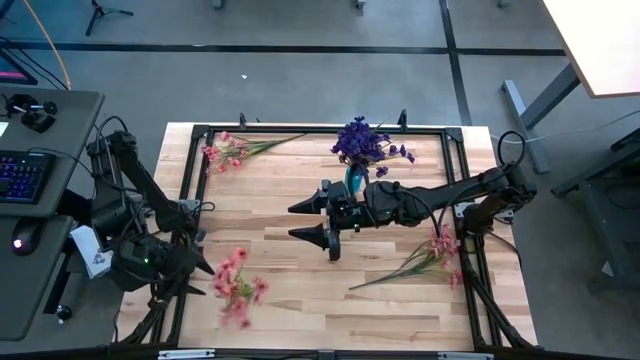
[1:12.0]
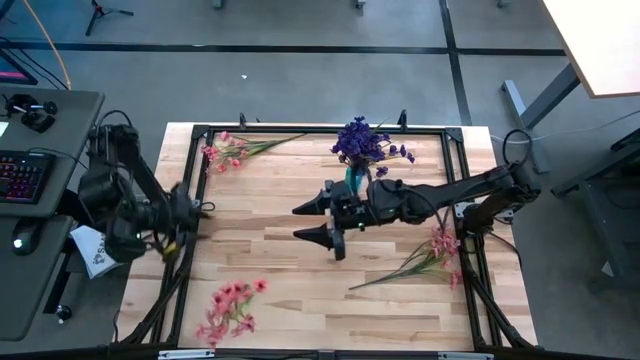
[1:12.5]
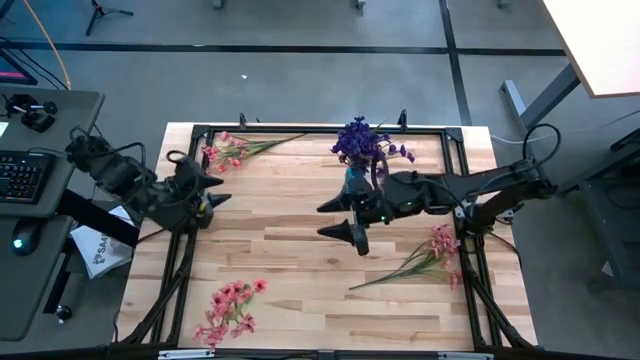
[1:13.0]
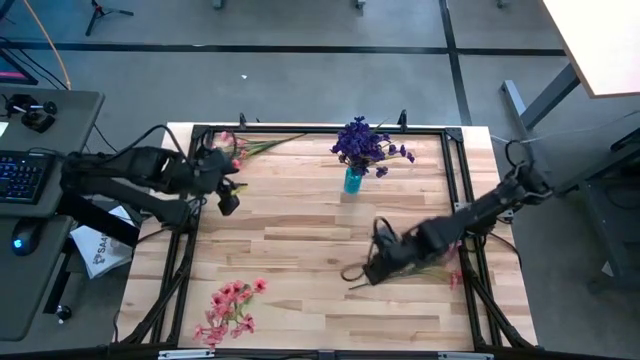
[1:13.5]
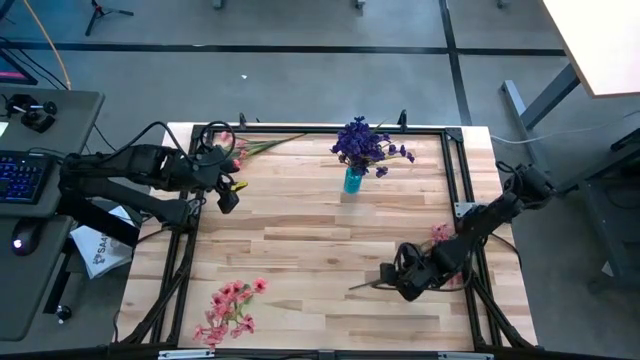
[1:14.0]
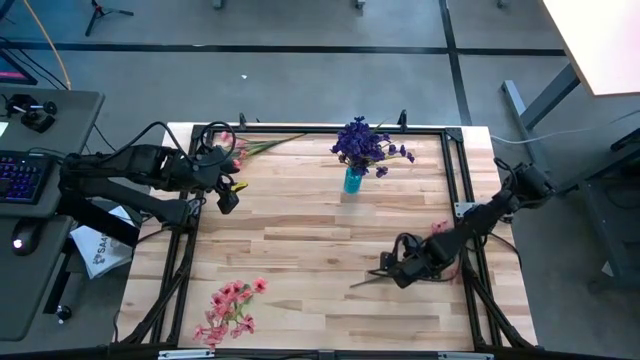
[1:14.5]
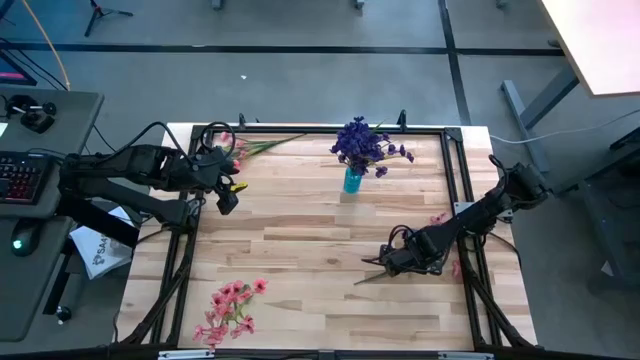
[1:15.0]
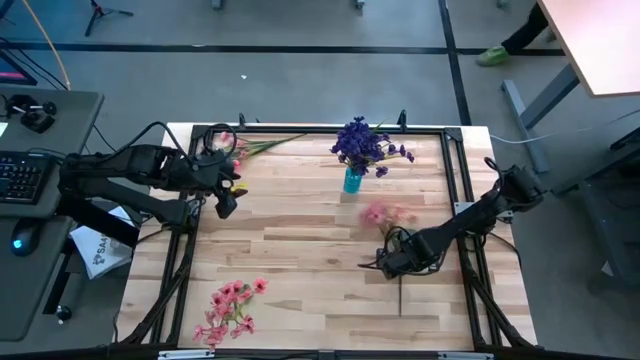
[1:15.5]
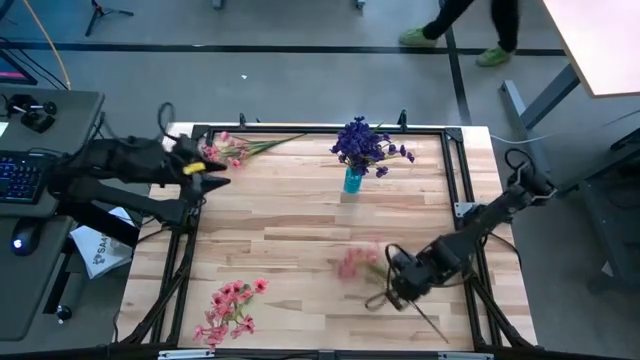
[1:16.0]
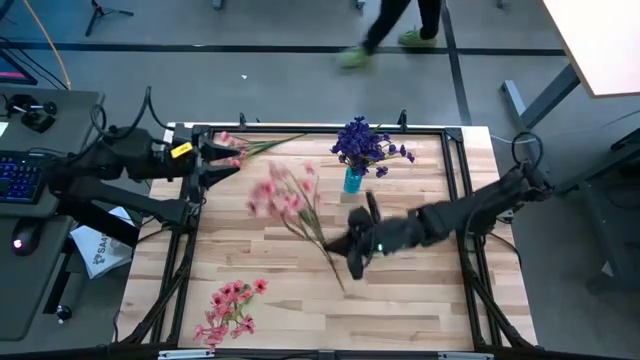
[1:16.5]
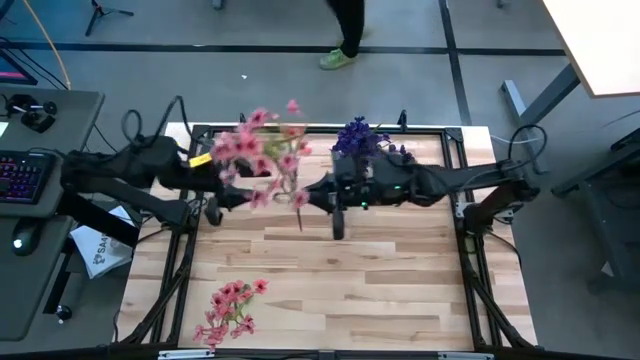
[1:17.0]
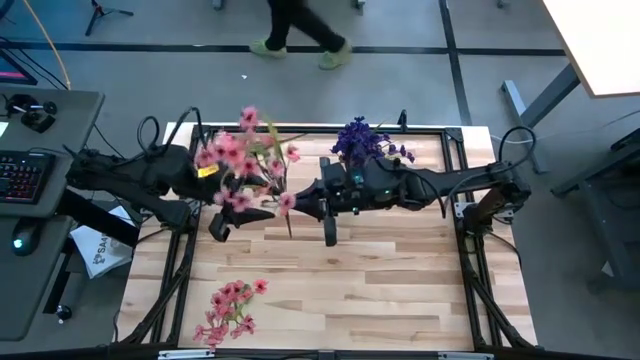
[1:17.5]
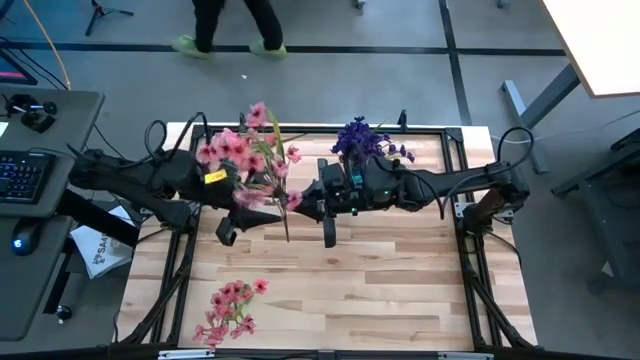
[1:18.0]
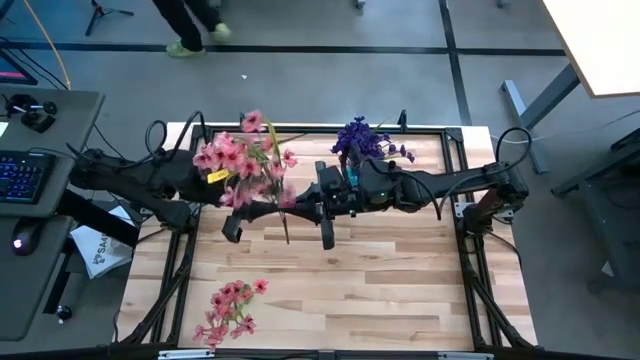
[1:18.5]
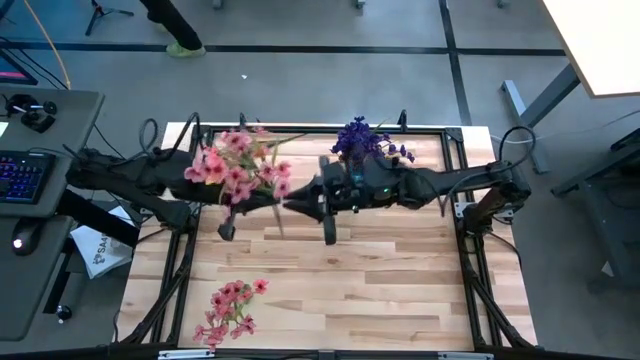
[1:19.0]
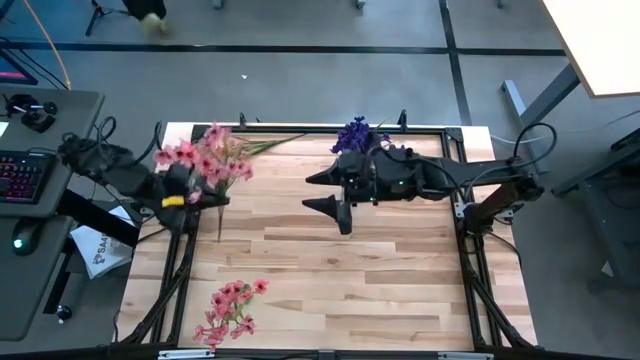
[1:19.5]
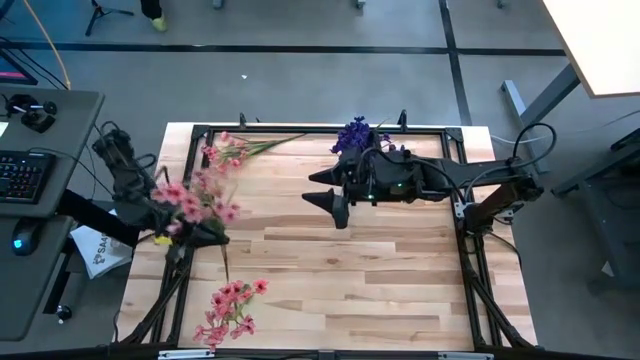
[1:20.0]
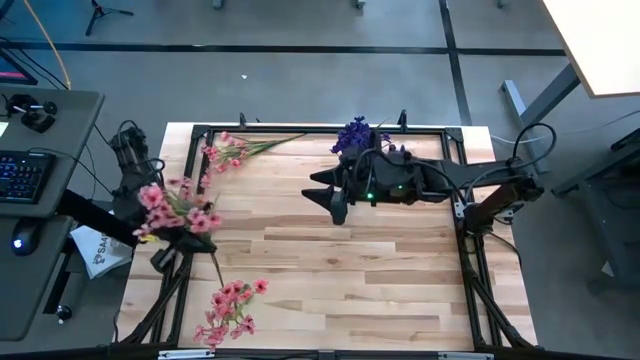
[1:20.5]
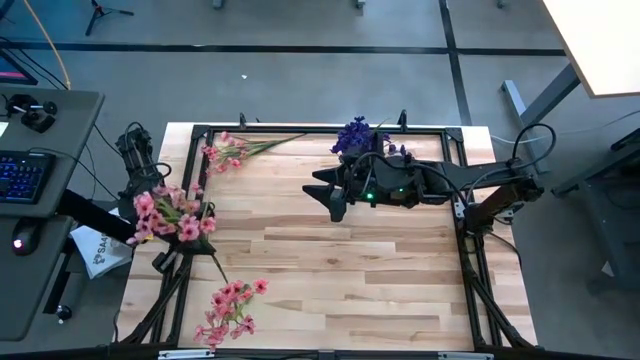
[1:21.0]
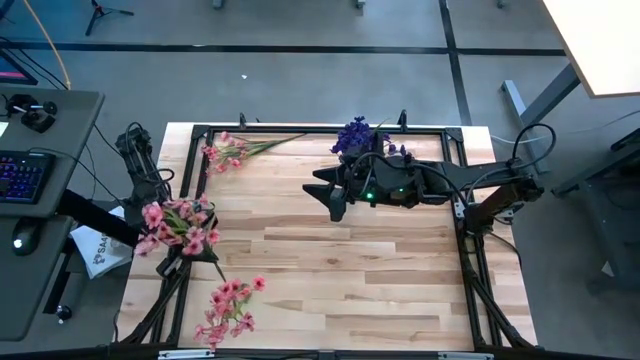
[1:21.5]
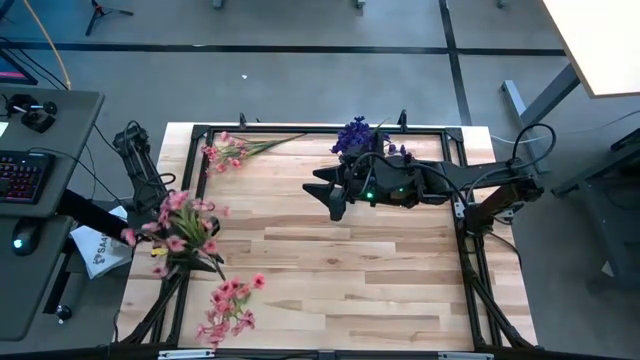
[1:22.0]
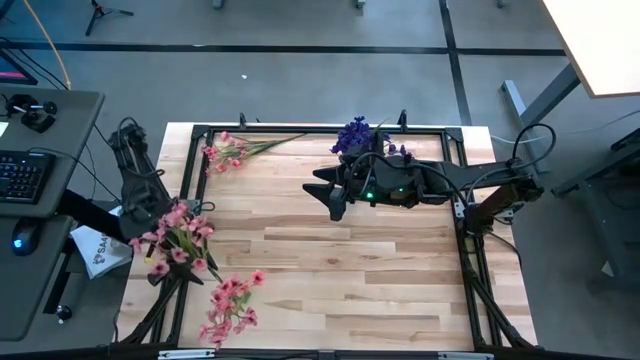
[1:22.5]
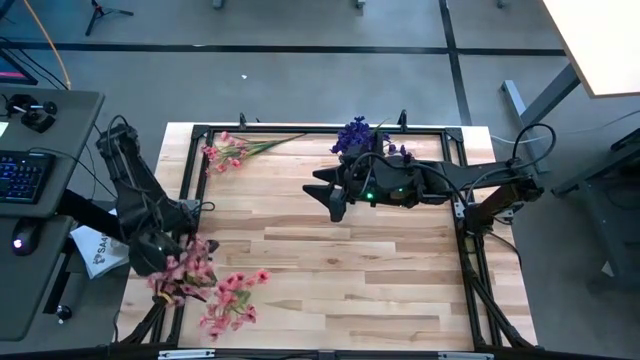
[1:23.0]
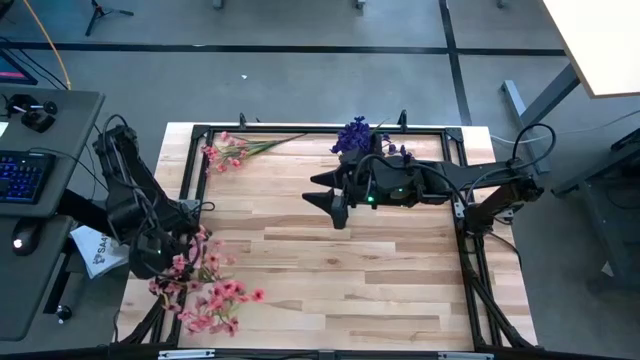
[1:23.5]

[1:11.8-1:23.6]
Task: Sort flowers into vase by color
Put the bottom pink flowers into the green vase

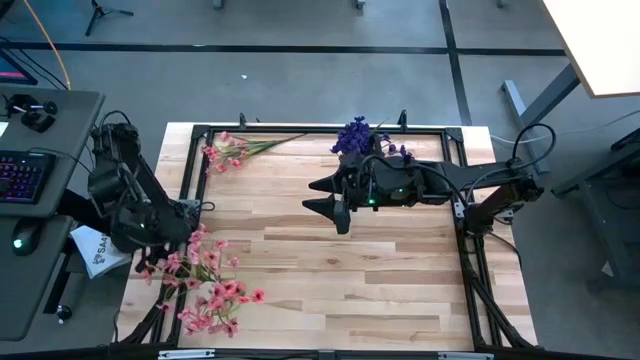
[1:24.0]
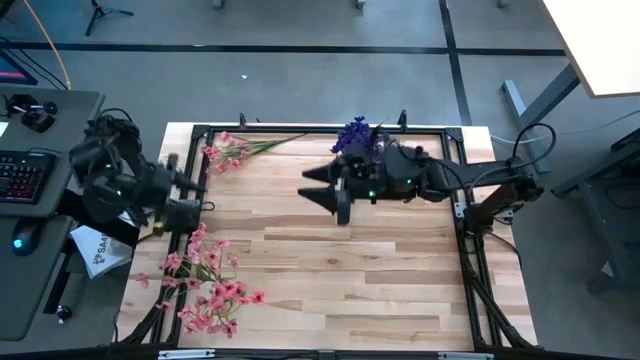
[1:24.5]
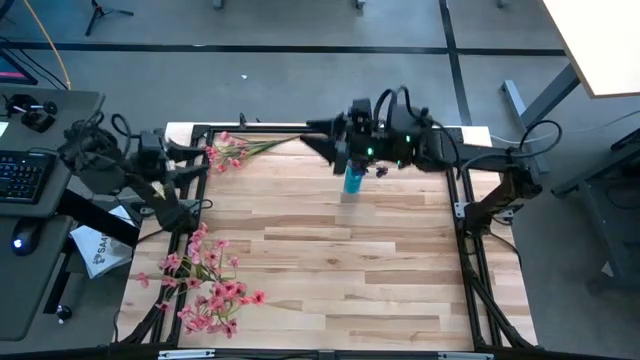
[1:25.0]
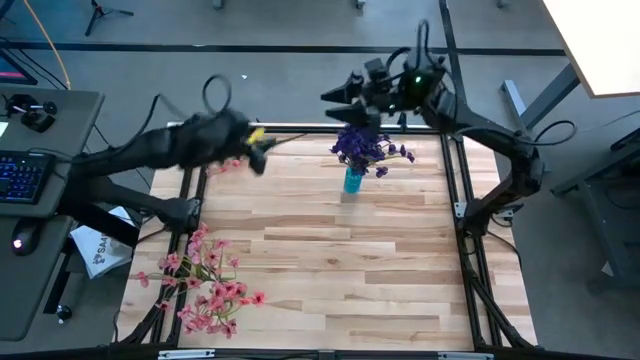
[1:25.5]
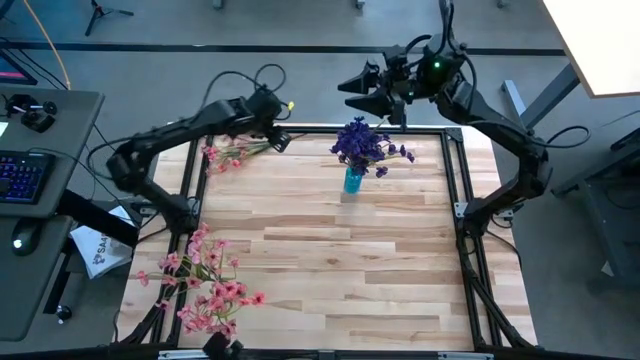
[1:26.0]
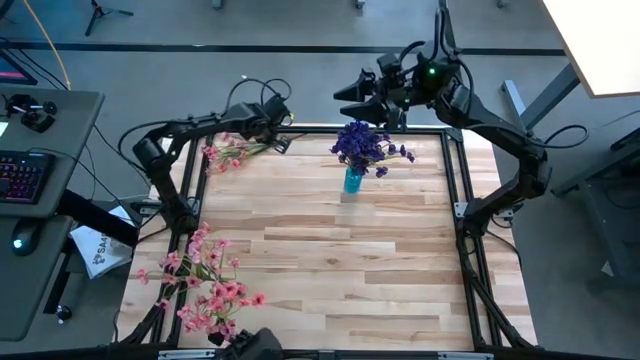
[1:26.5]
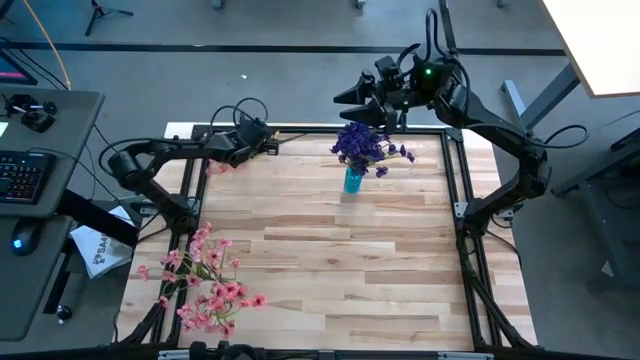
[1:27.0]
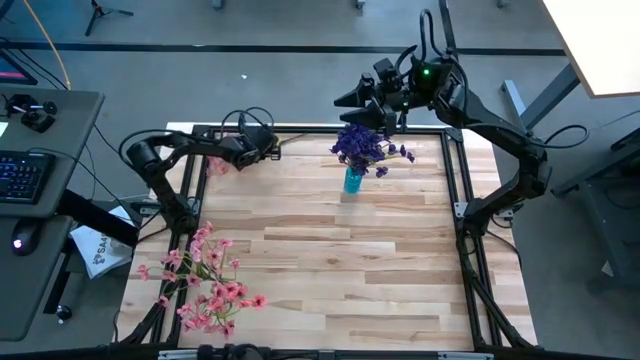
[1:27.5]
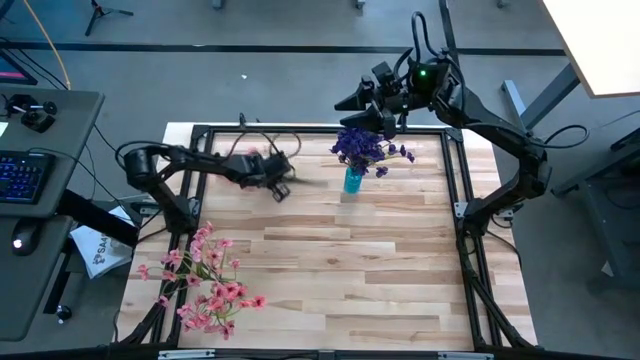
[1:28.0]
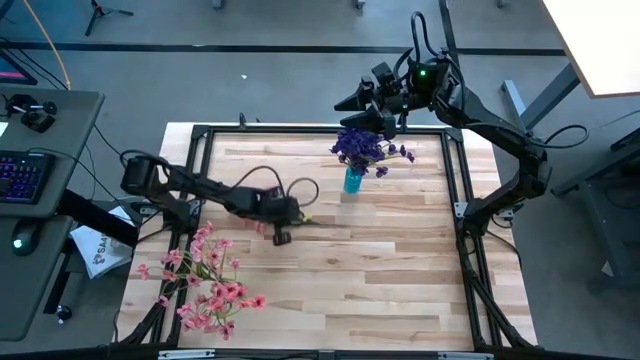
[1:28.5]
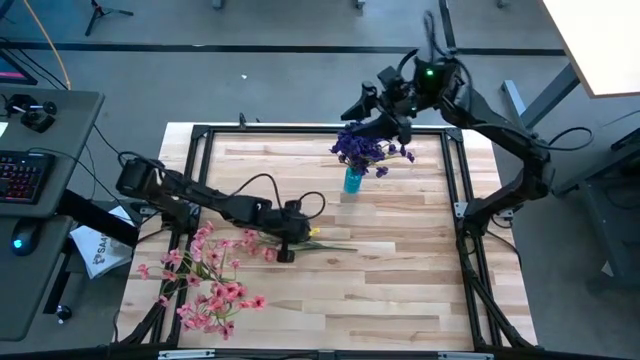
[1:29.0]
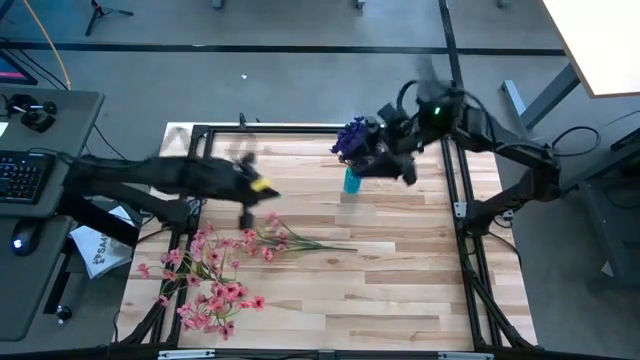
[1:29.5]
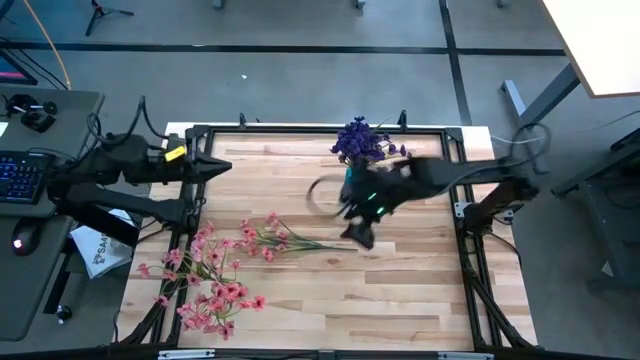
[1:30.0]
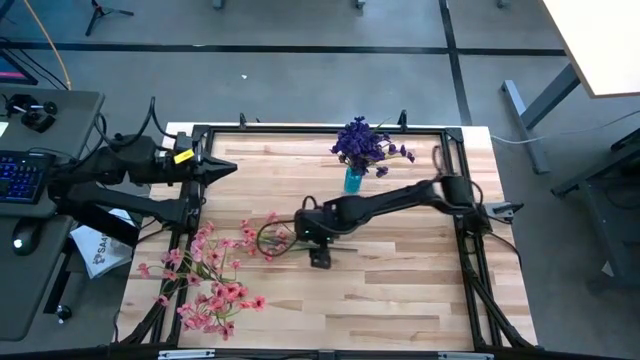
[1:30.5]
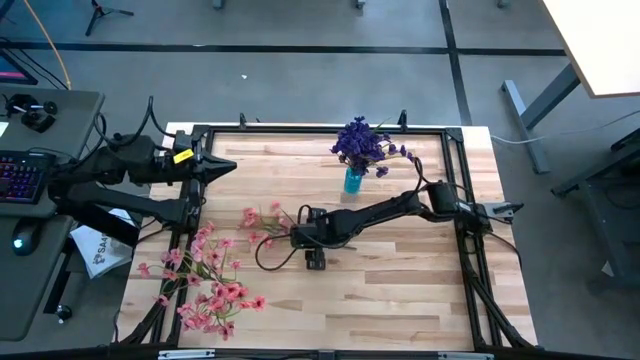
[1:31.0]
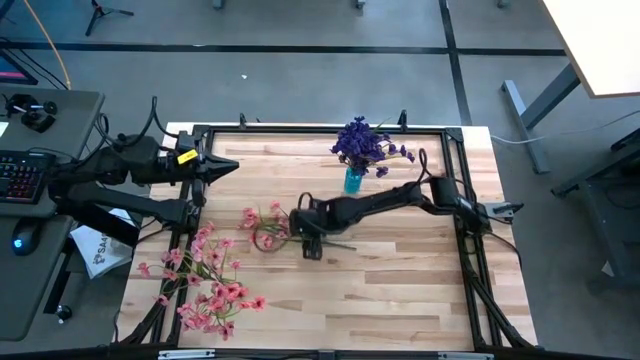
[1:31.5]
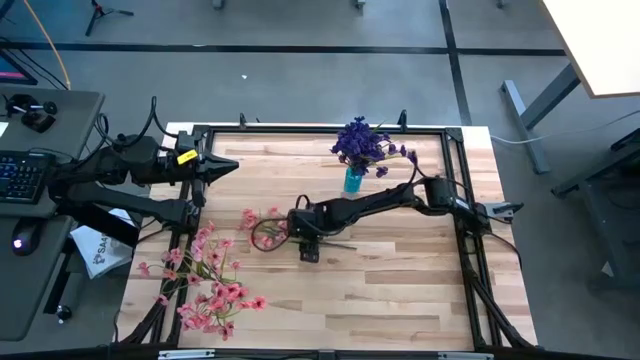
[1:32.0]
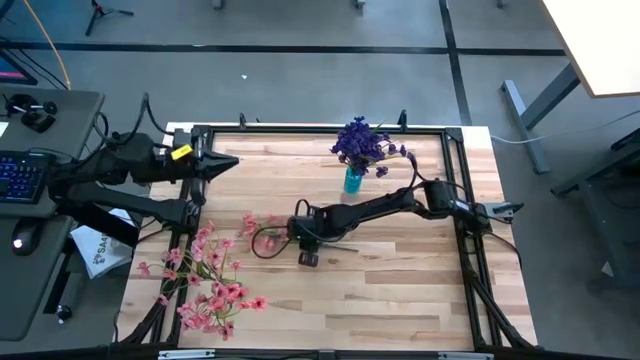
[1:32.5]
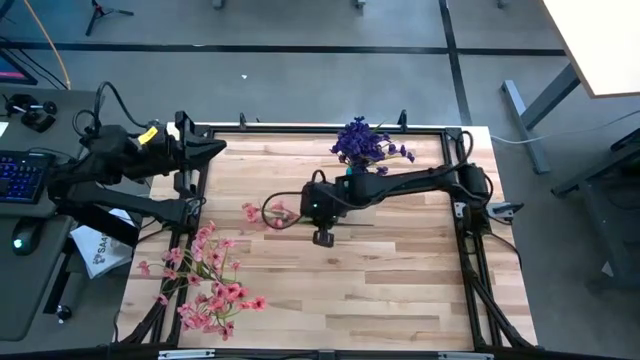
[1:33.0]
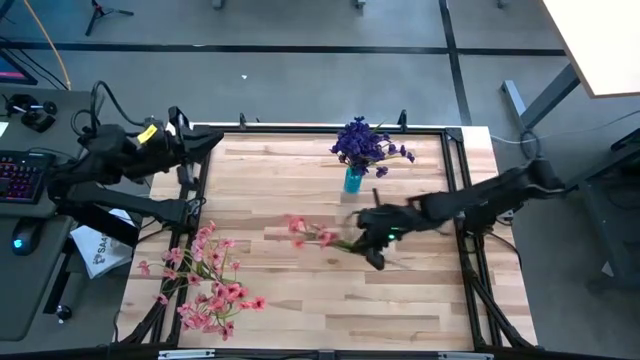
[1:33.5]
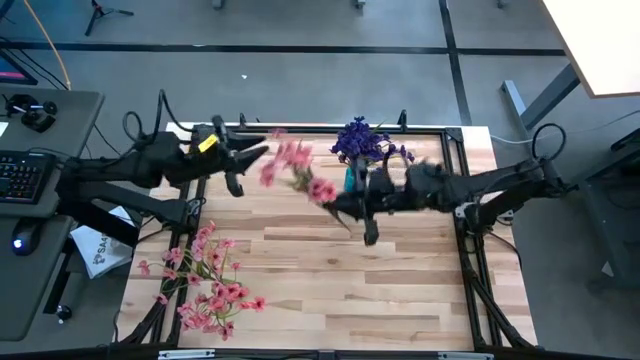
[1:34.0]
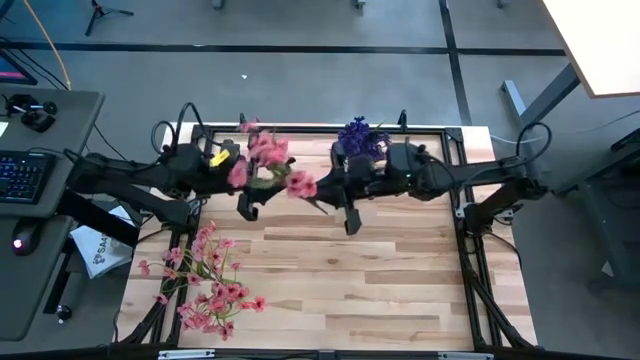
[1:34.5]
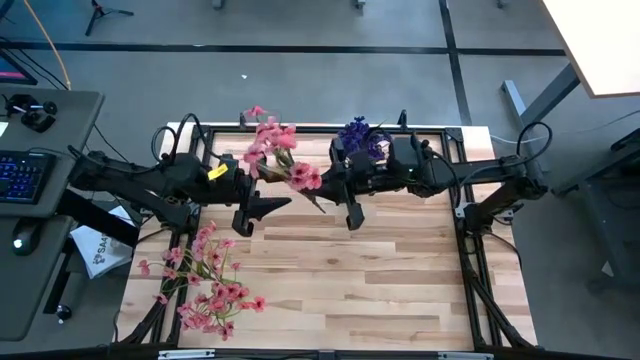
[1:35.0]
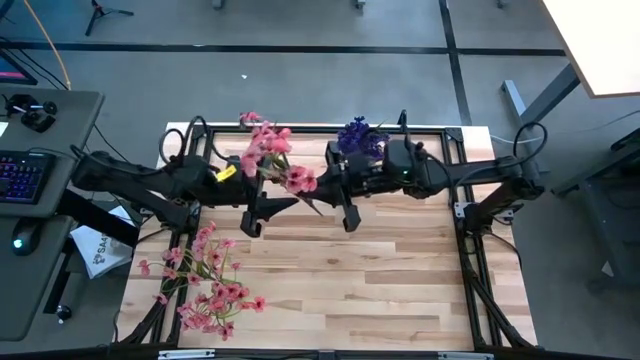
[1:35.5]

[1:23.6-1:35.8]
Put the pink flowers into the green vase
